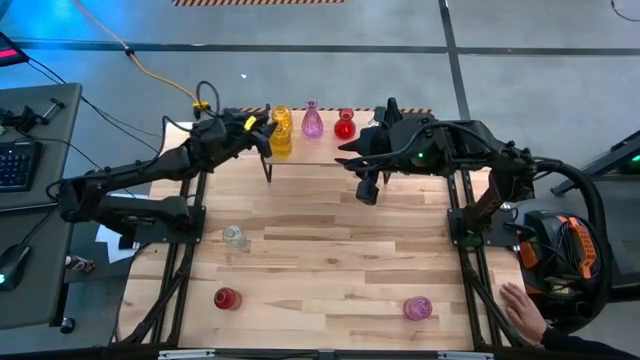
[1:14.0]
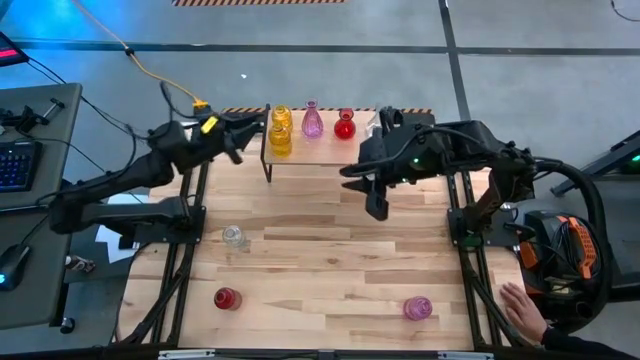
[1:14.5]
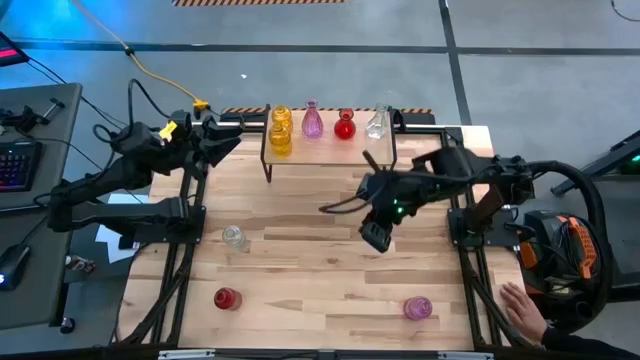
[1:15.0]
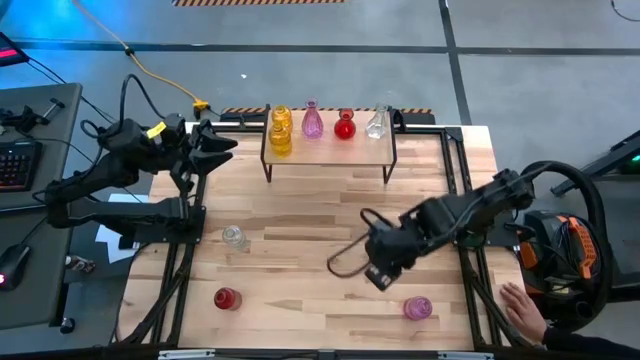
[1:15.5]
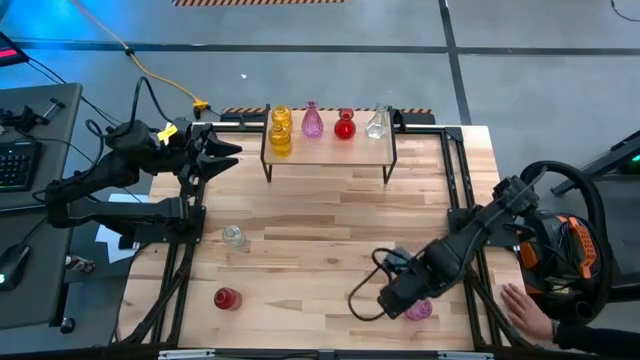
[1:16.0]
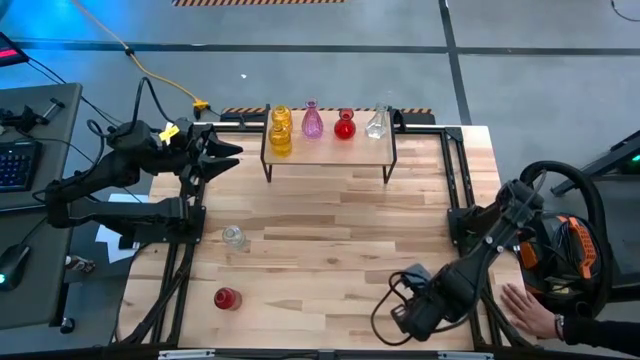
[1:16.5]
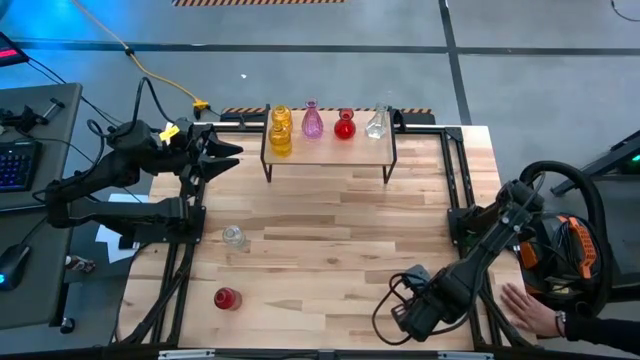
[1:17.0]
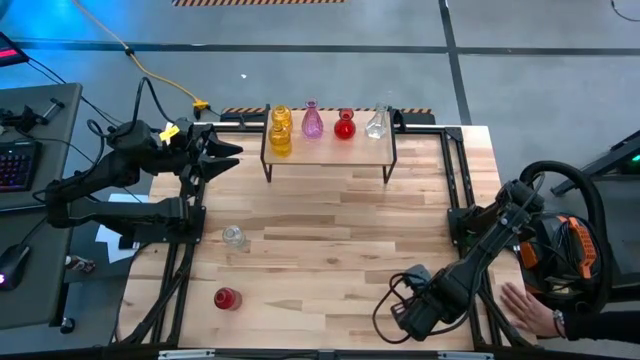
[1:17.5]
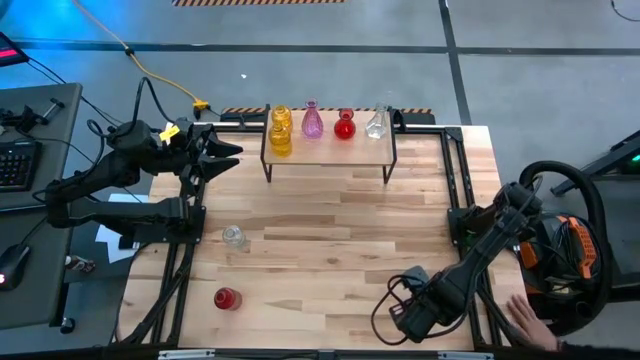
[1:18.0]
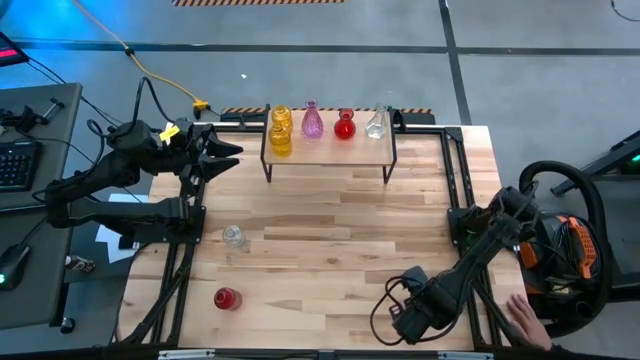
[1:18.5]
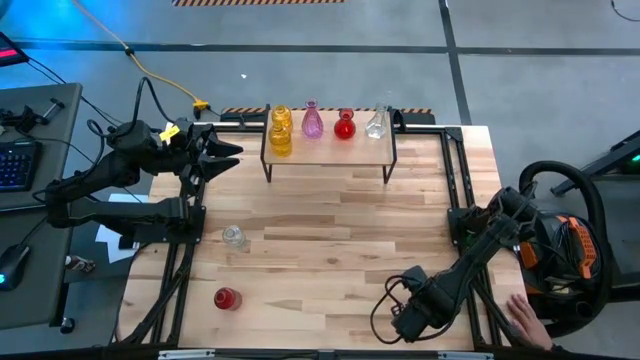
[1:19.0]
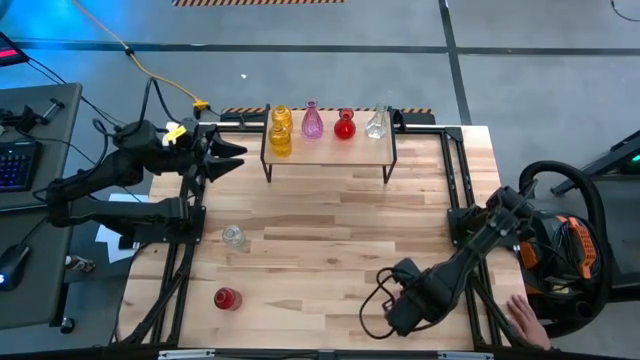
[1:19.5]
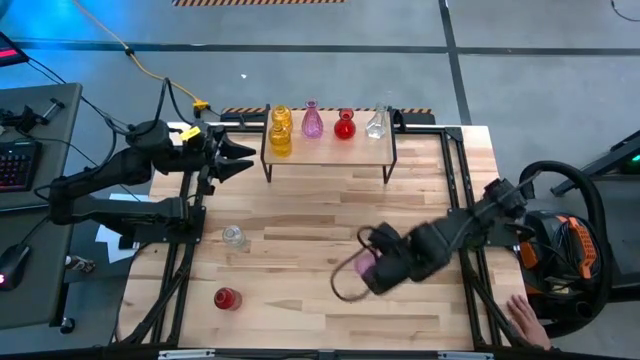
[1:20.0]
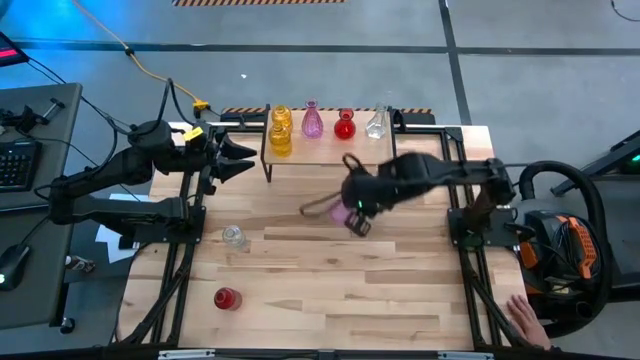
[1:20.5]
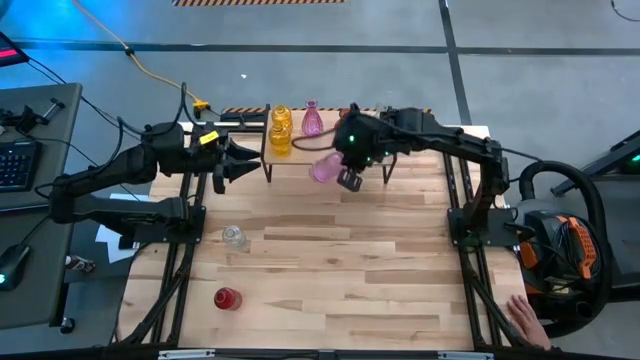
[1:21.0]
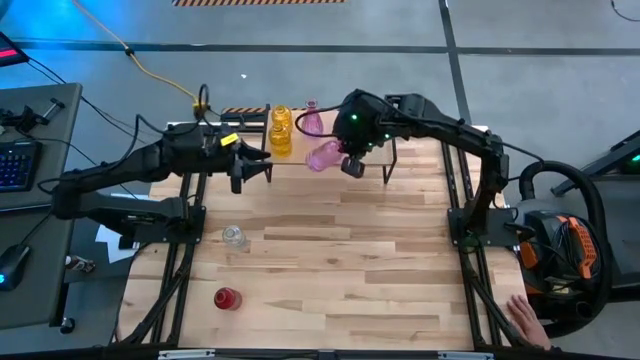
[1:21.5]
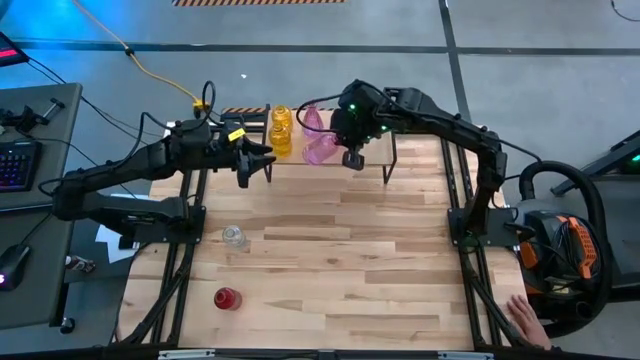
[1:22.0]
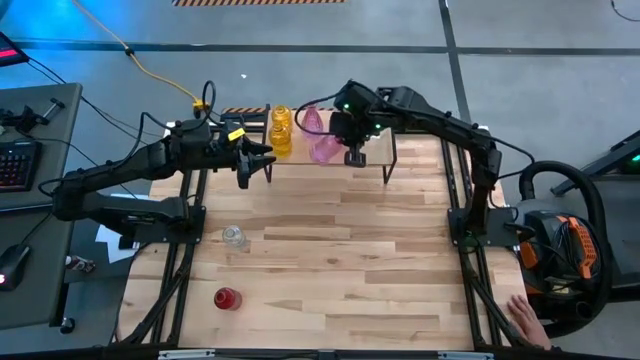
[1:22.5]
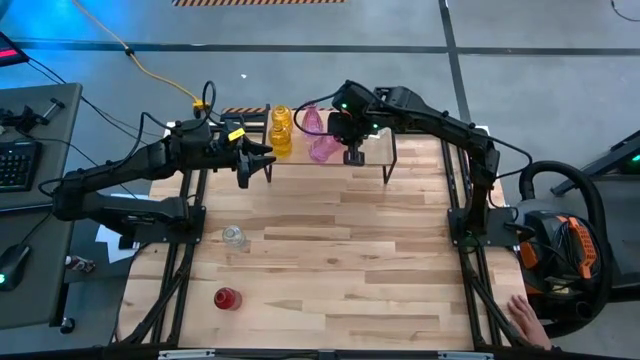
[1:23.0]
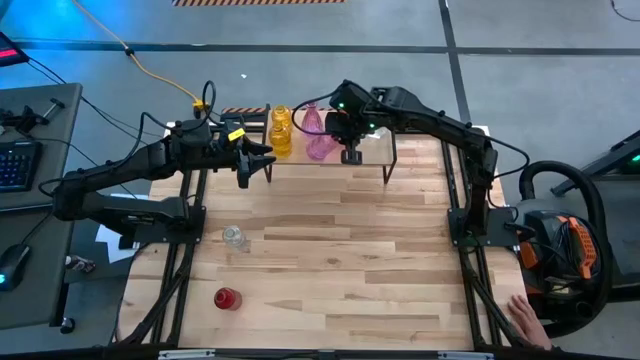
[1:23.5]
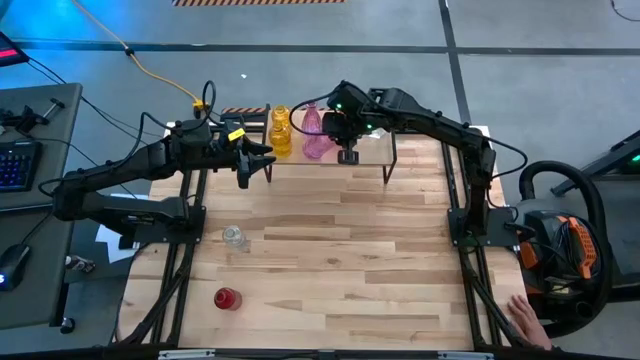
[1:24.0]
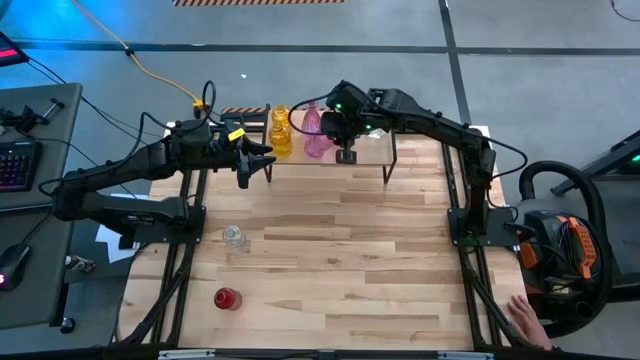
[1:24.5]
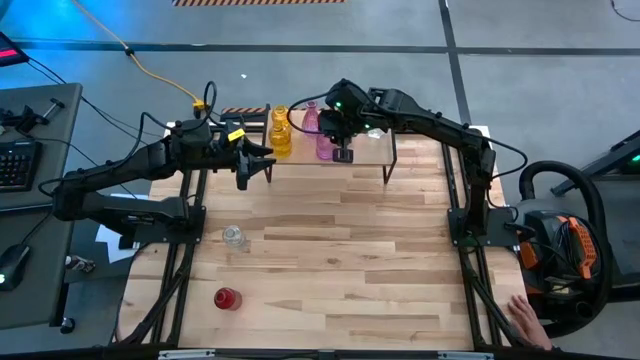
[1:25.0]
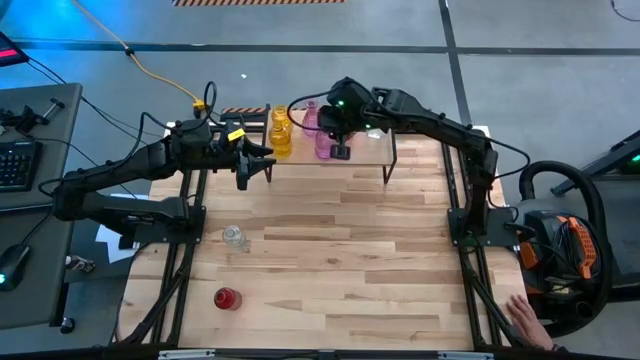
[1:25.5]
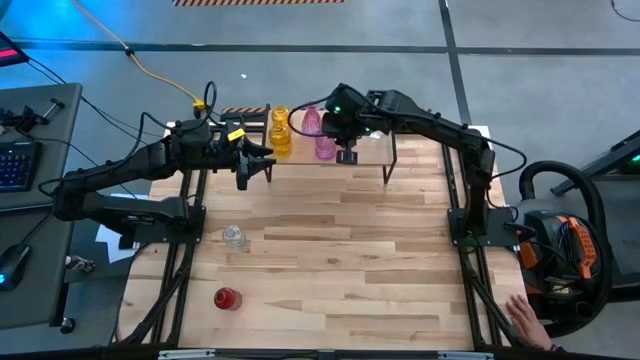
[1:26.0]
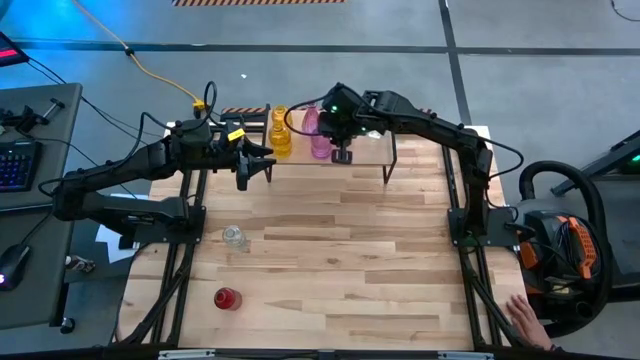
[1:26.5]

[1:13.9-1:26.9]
Task: sort vases onto shelf
Put the purple vase on the shelf

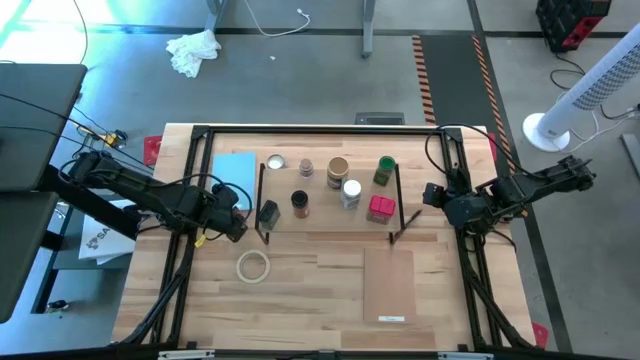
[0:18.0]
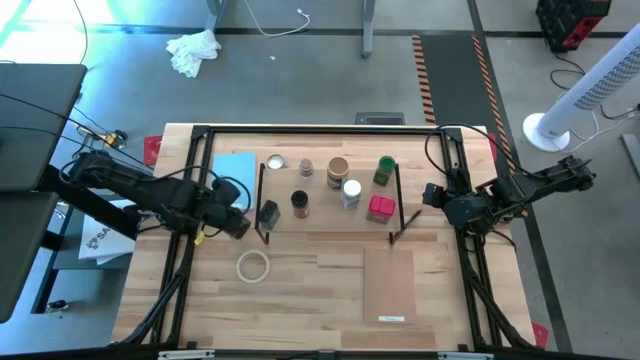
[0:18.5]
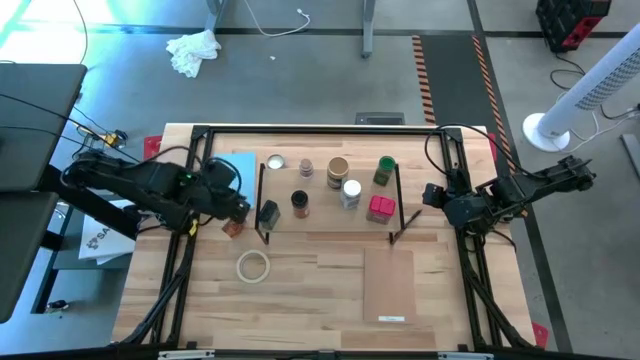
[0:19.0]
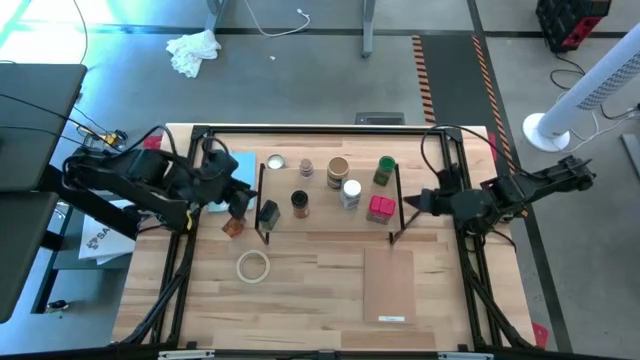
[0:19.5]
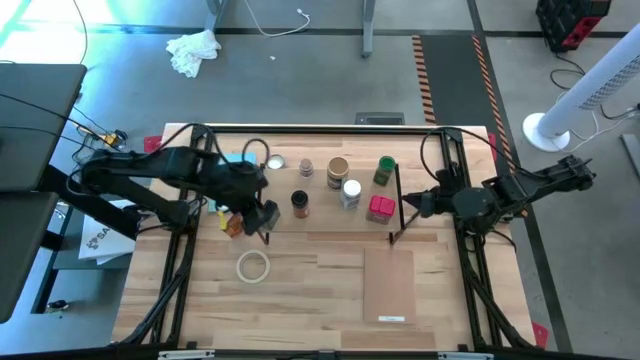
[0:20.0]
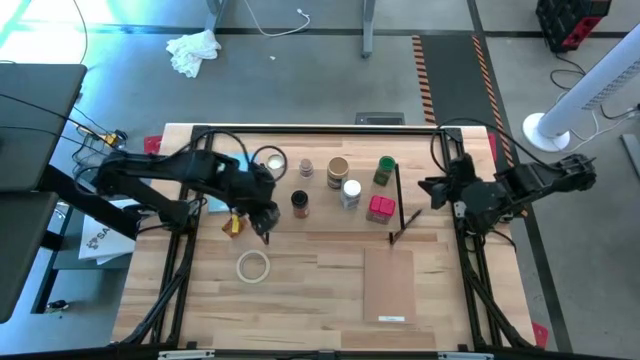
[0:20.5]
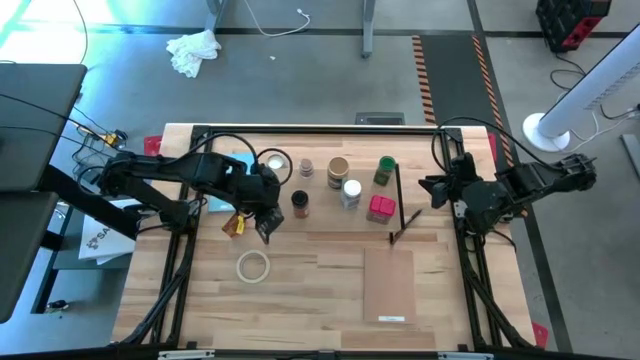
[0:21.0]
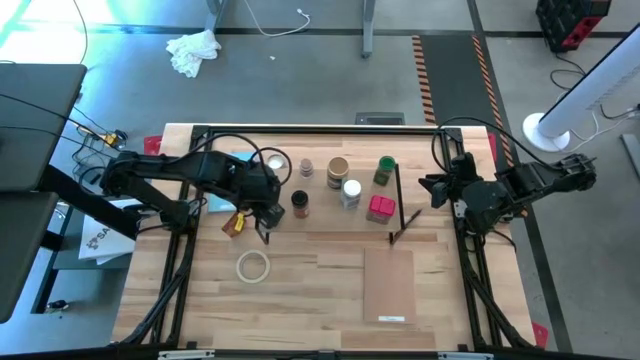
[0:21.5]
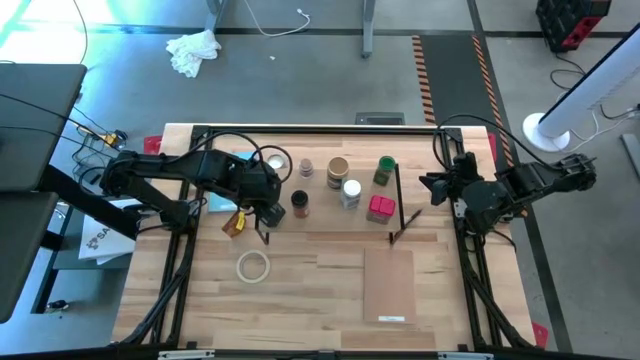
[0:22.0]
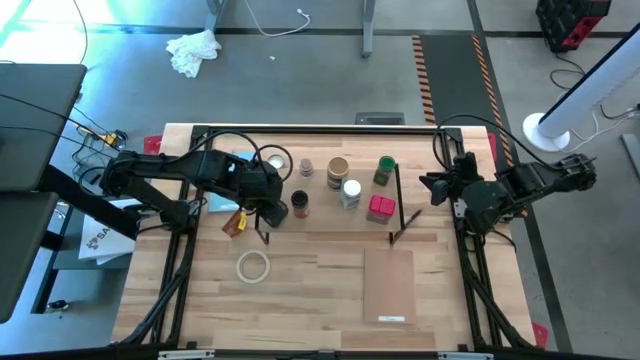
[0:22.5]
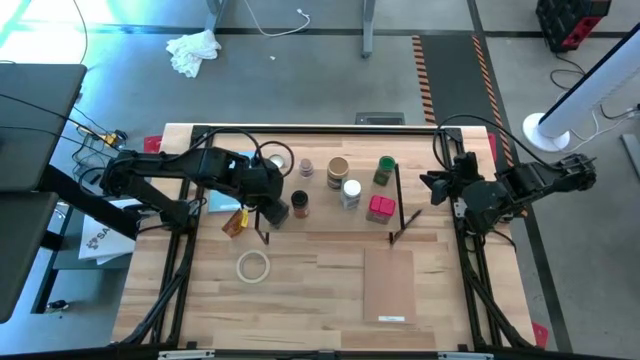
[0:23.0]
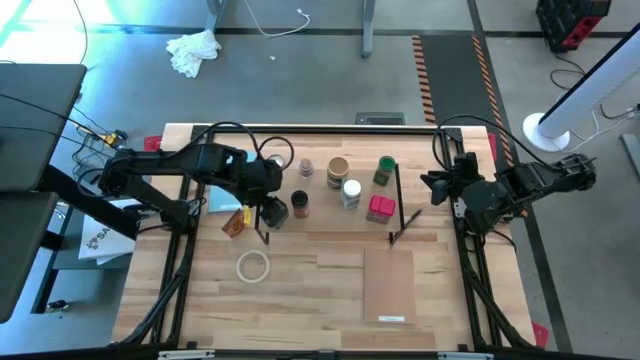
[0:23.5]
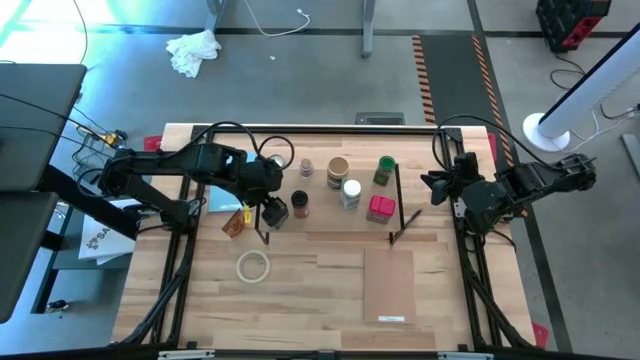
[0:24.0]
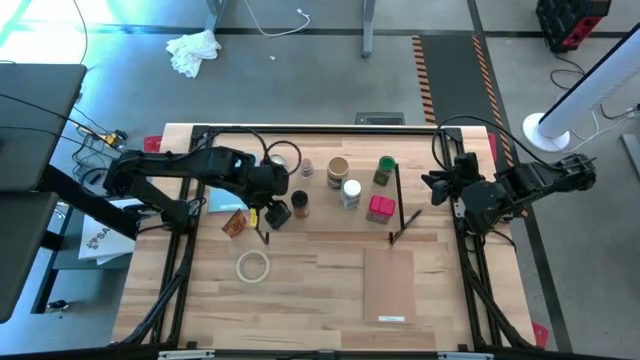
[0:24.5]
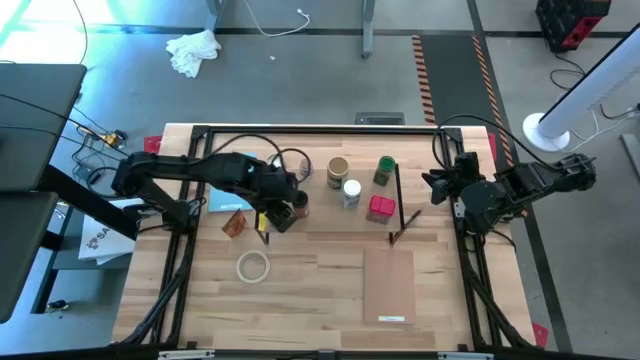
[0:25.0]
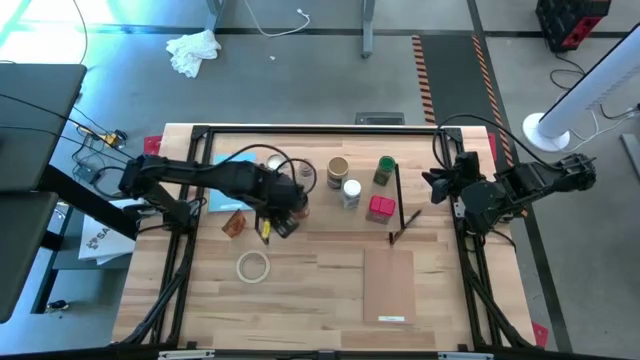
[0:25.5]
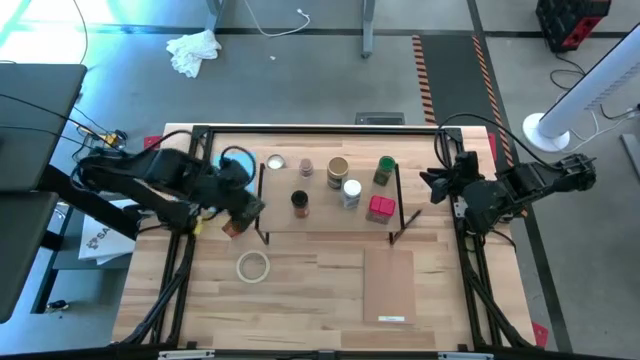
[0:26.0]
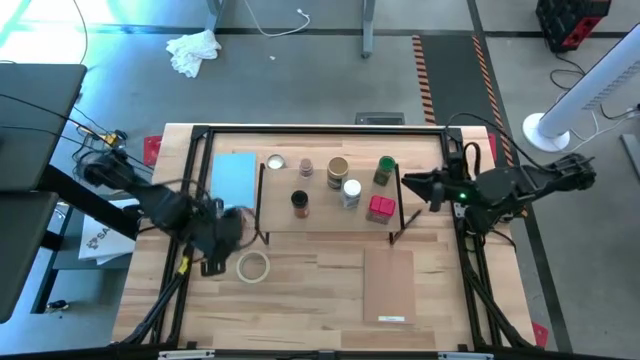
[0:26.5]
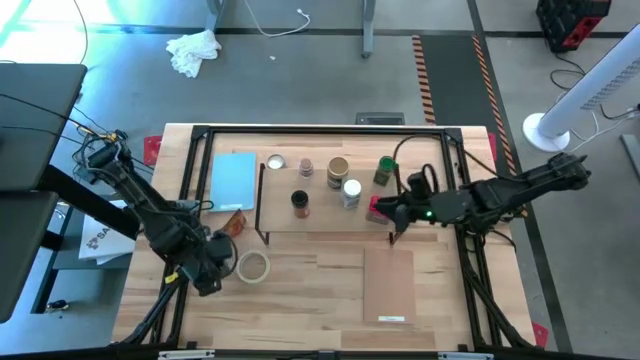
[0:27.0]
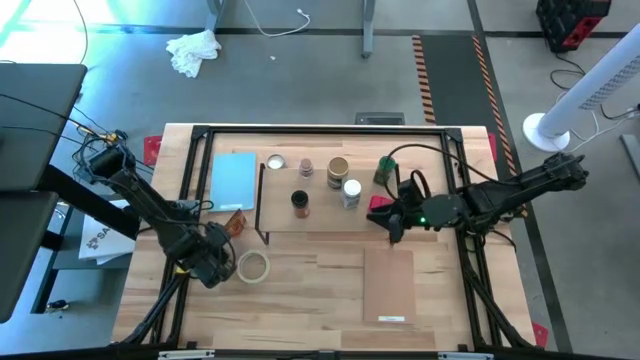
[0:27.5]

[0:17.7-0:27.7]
Task: Shelf spices
Remove the black seasoning can from the shelf
